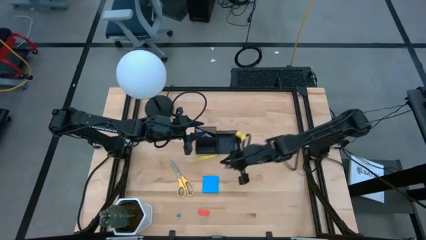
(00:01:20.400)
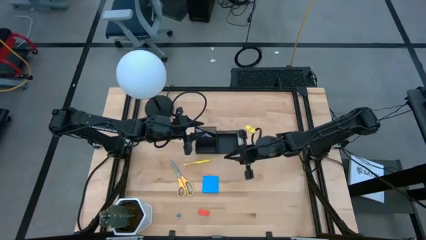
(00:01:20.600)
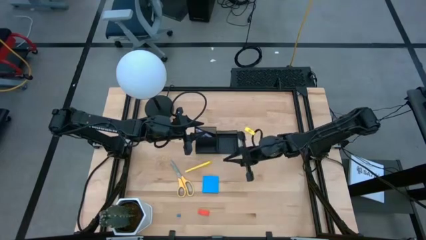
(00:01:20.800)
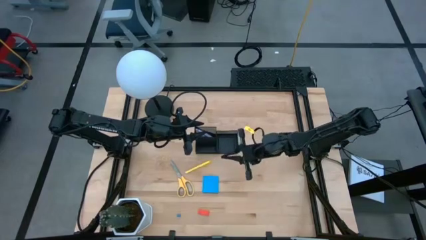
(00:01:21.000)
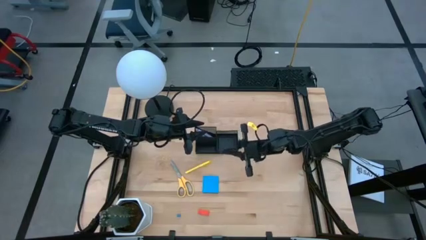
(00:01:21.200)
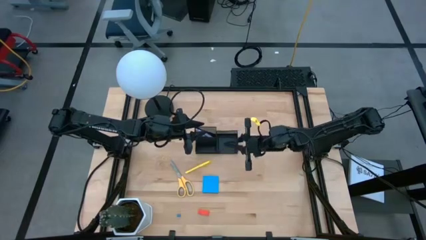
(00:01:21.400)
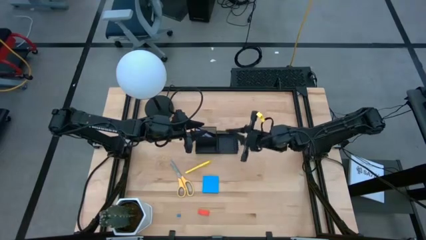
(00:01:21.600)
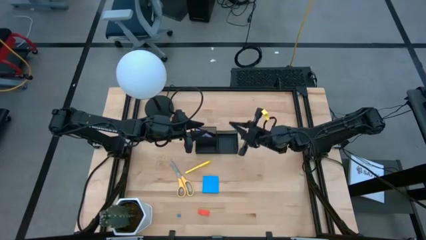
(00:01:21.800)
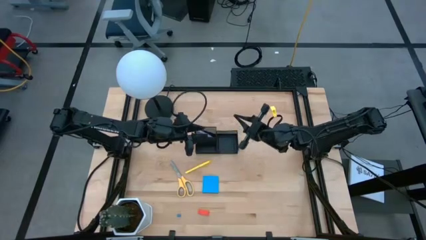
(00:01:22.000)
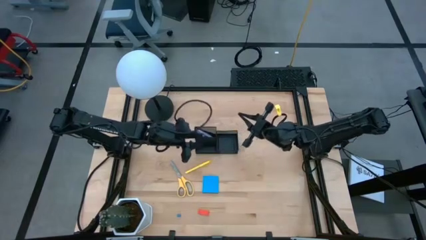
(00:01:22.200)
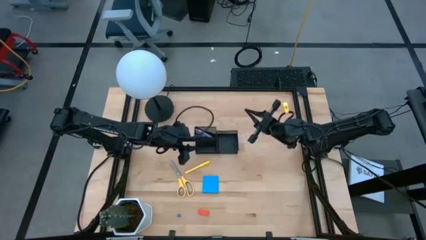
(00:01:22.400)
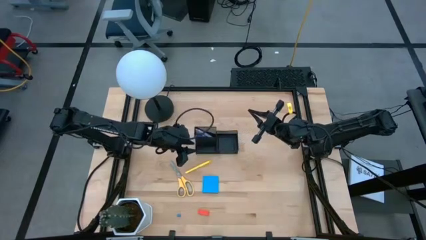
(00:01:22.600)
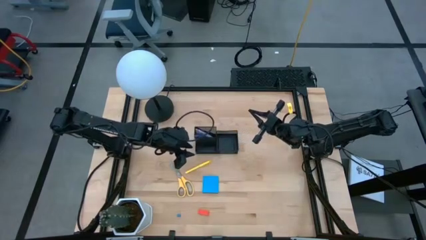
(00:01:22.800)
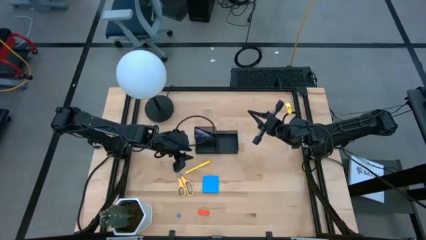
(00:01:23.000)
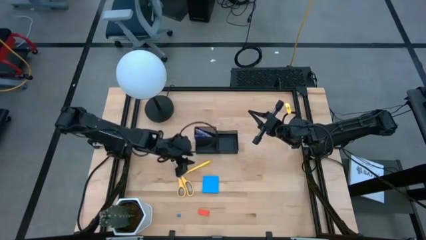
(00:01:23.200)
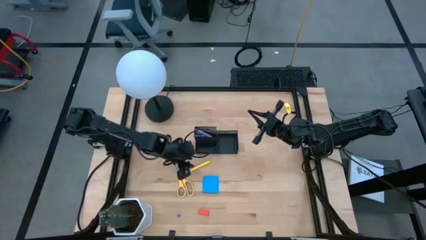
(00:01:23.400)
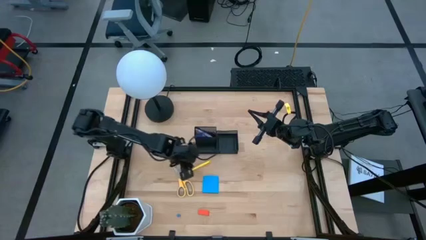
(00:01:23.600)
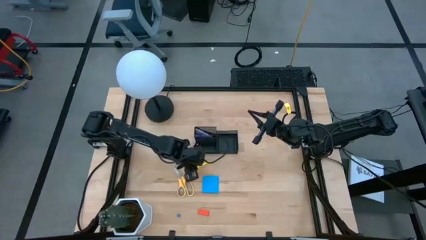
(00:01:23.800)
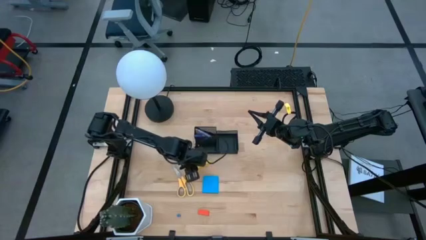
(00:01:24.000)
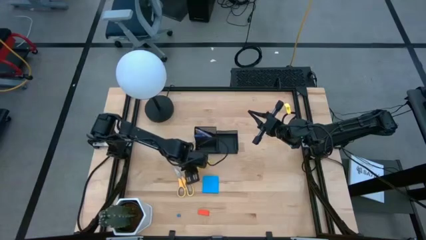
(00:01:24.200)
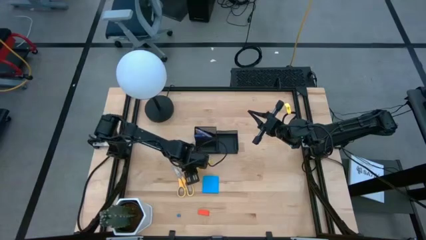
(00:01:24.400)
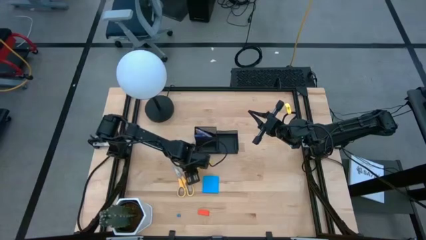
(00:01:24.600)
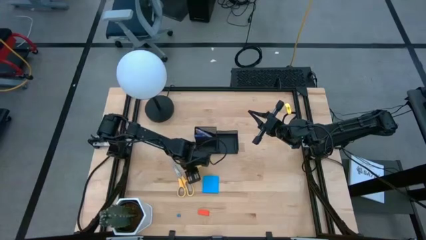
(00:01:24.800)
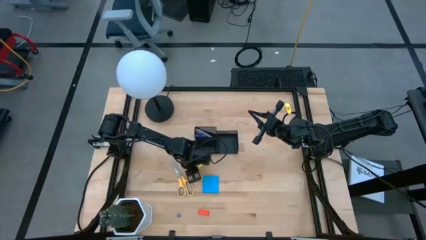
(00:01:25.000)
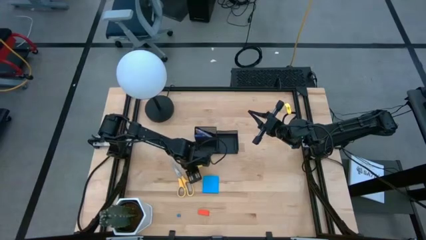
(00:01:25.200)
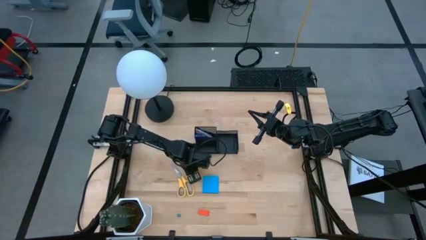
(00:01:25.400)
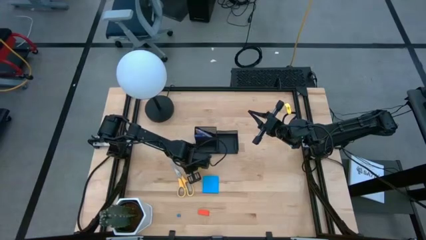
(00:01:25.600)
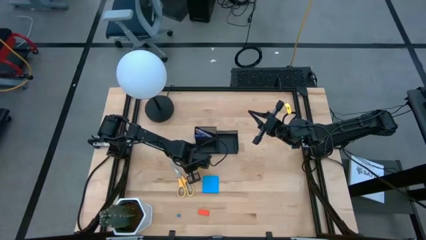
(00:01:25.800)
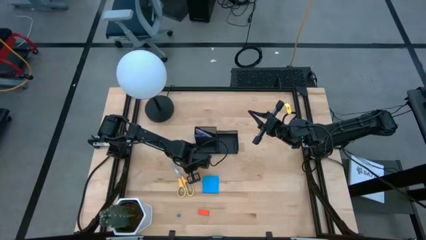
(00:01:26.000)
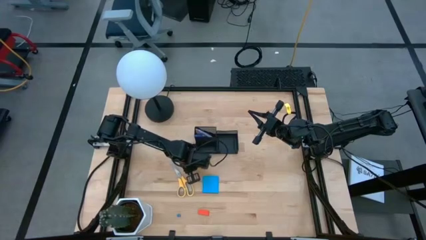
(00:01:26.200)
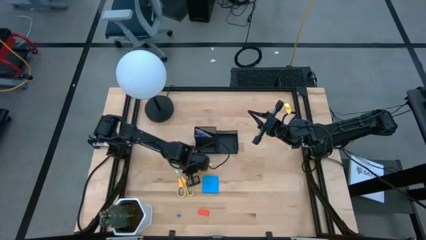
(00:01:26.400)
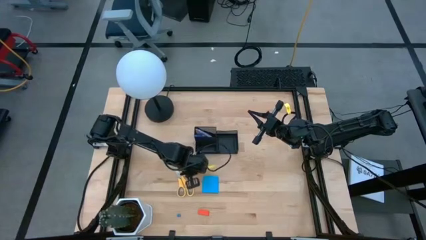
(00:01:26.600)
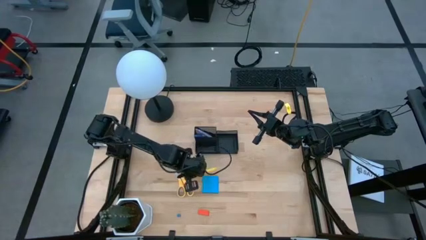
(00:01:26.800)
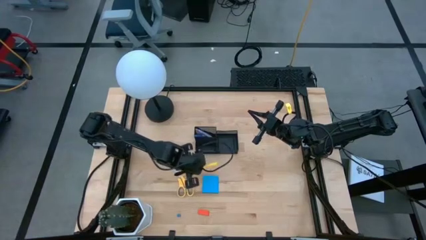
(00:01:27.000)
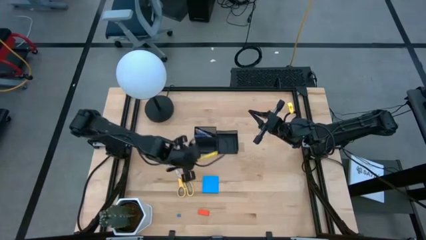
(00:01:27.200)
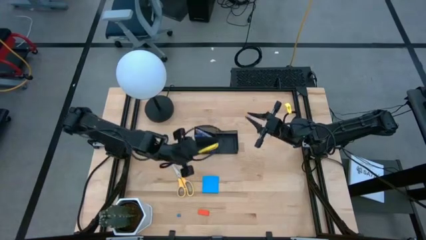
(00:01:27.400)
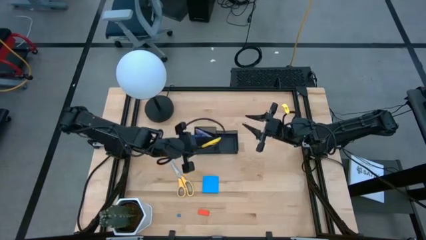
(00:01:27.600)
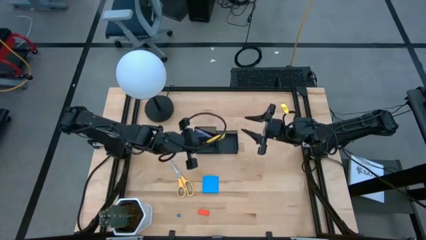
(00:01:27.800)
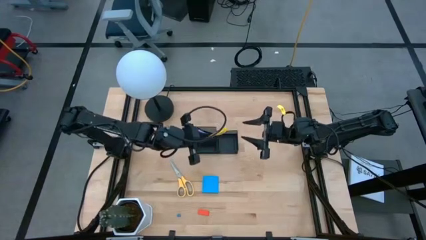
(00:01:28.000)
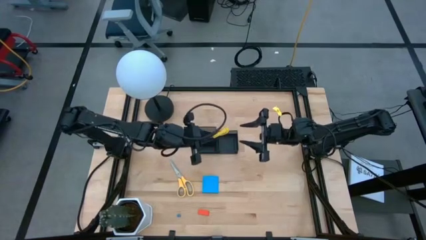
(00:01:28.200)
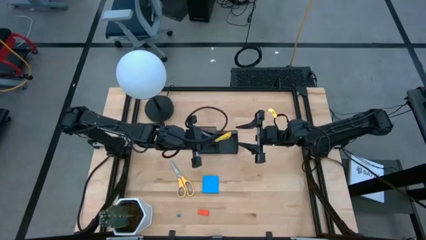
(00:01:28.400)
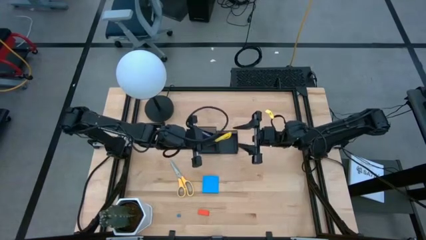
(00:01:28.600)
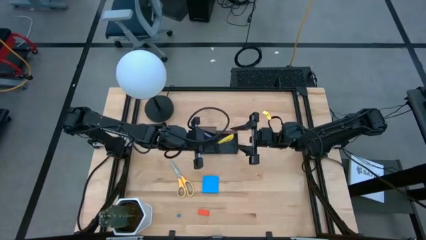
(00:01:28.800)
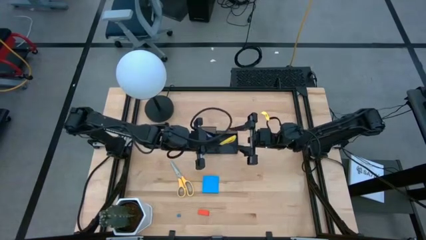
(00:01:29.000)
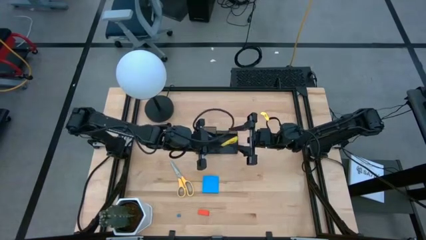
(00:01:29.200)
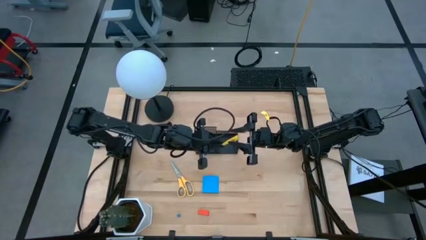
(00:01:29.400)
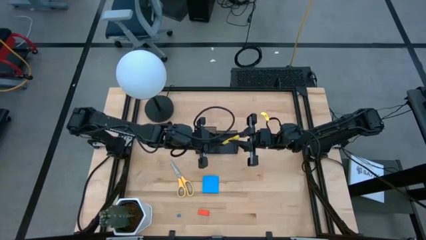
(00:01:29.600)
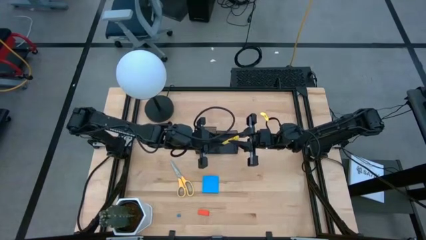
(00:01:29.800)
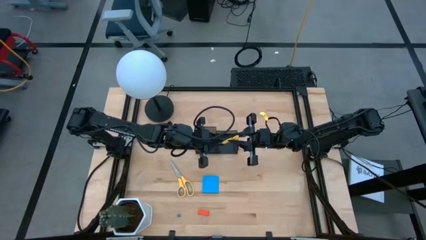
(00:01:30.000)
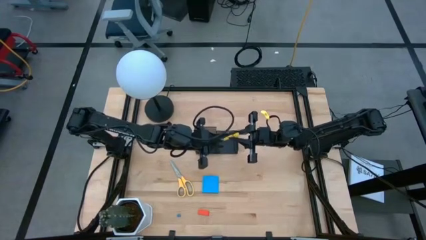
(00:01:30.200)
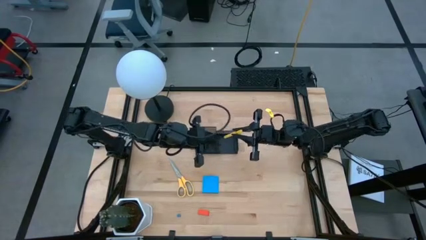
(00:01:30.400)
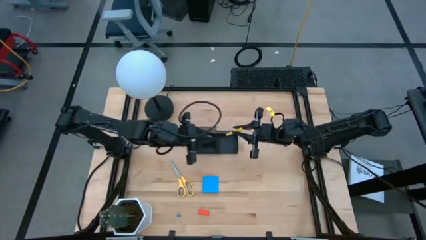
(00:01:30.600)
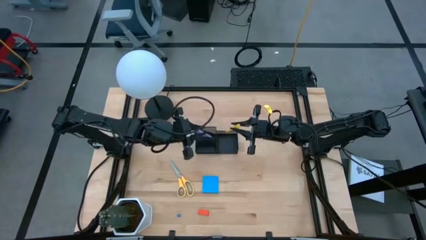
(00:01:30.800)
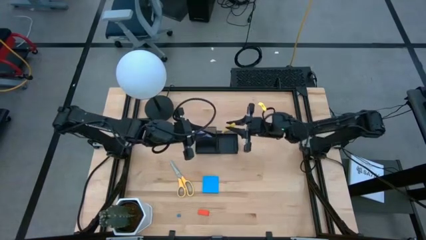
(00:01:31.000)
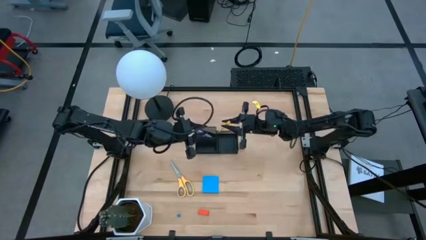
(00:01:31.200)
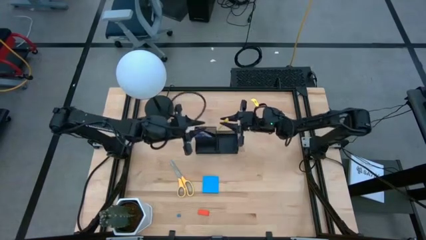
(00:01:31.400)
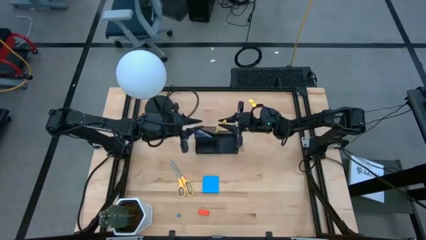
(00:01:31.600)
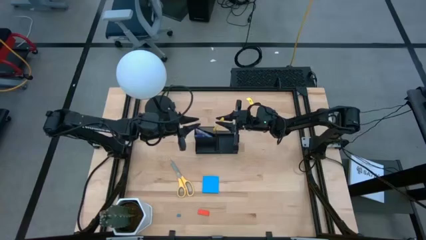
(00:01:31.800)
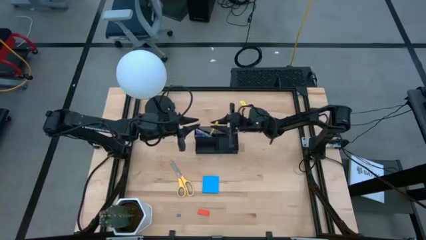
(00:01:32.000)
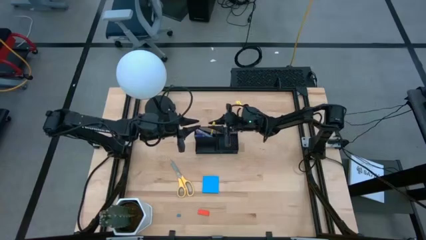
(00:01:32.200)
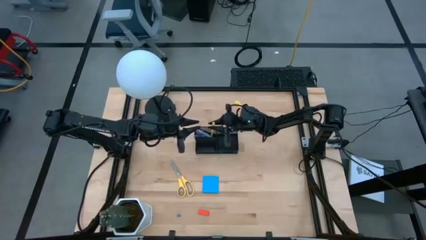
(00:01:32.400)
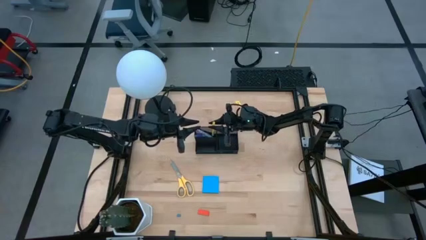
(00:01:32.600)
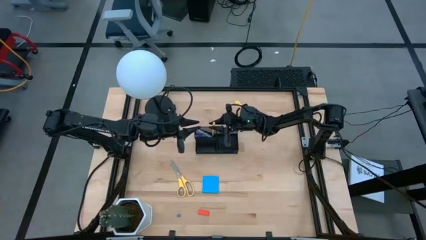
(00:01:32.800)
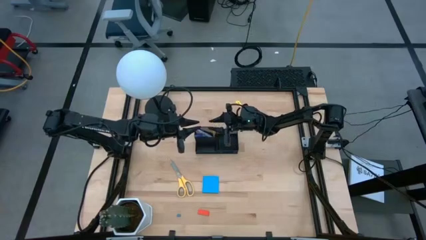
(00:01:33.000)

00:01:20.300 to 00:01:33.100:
Task: Pick and place office supplies into organizer
Put the yellow pen into the desk organizer

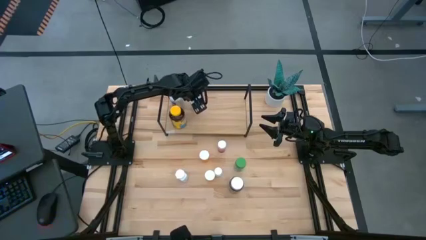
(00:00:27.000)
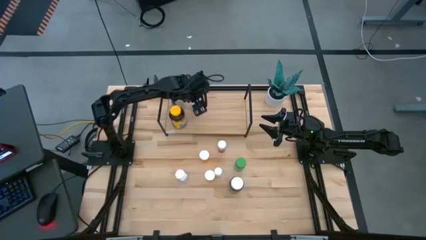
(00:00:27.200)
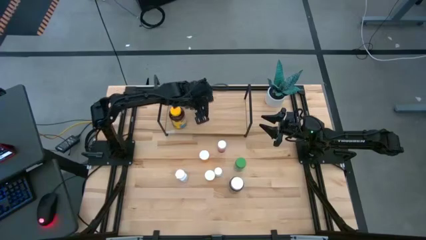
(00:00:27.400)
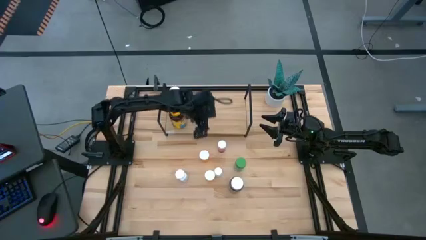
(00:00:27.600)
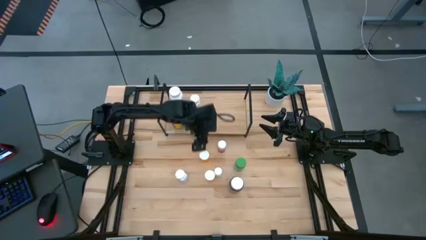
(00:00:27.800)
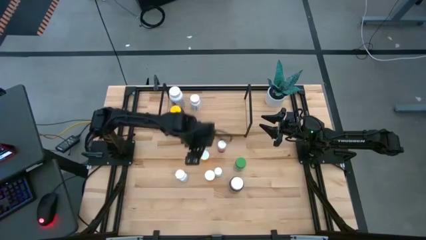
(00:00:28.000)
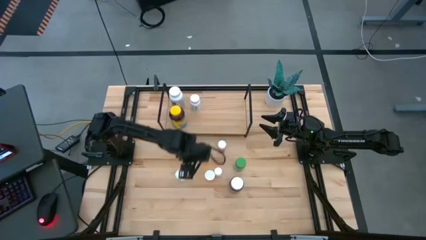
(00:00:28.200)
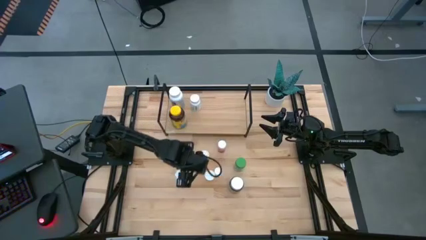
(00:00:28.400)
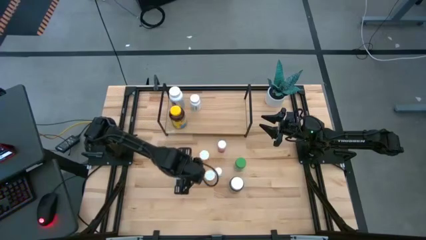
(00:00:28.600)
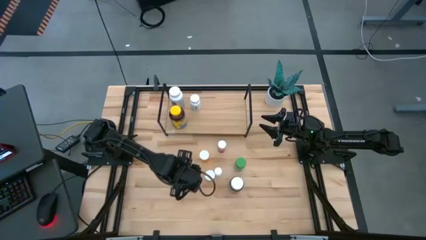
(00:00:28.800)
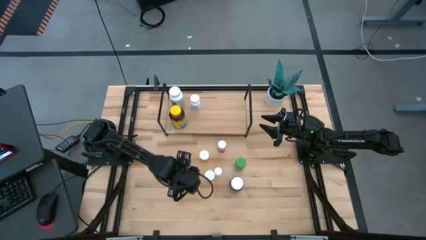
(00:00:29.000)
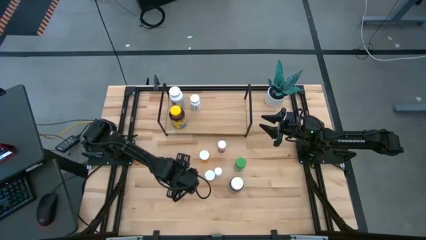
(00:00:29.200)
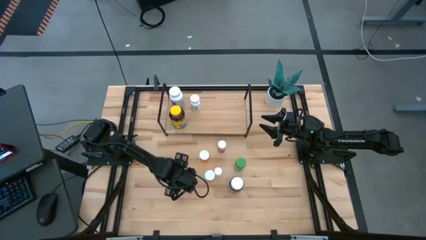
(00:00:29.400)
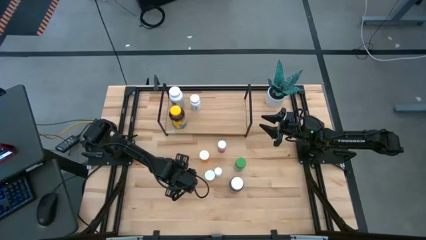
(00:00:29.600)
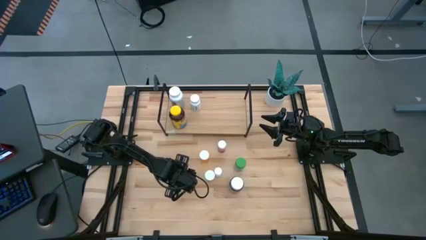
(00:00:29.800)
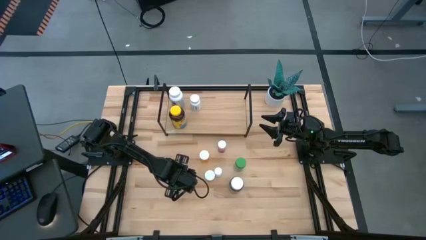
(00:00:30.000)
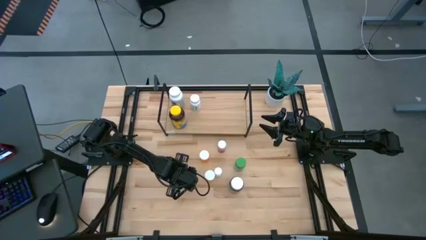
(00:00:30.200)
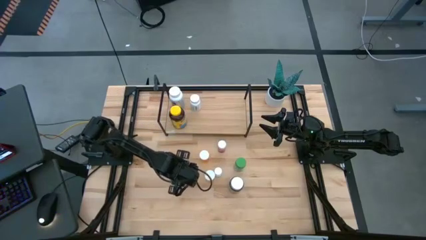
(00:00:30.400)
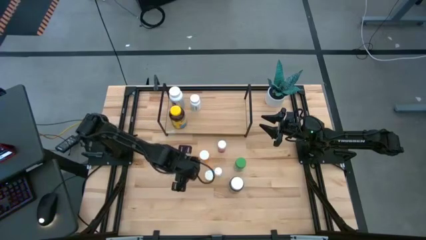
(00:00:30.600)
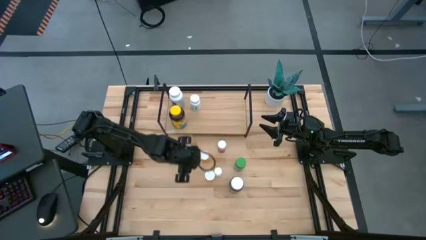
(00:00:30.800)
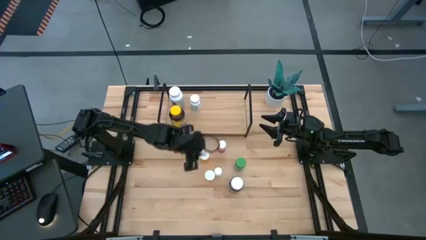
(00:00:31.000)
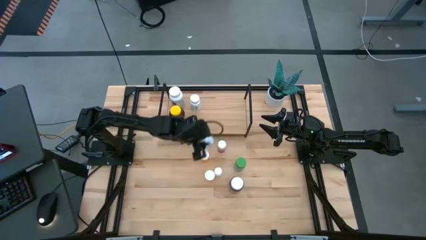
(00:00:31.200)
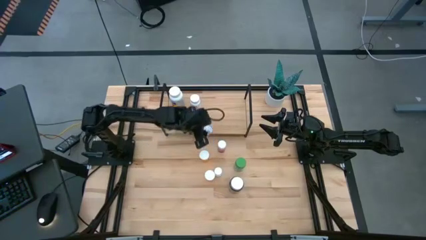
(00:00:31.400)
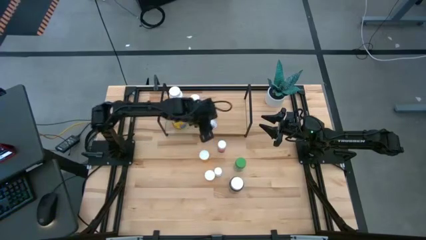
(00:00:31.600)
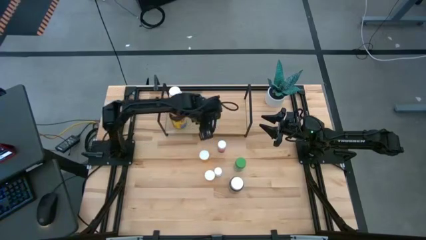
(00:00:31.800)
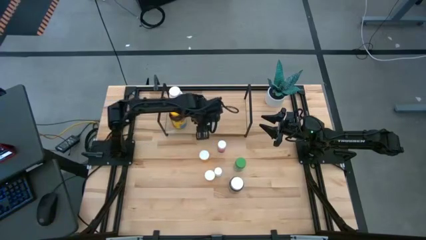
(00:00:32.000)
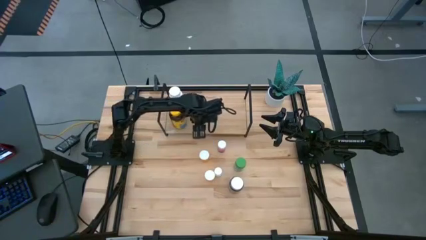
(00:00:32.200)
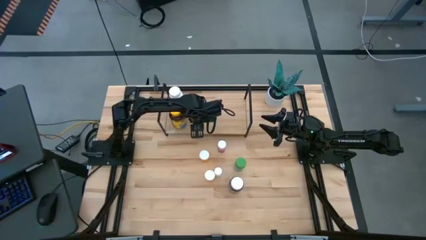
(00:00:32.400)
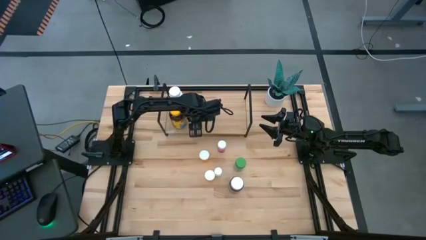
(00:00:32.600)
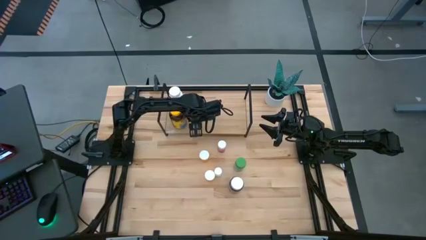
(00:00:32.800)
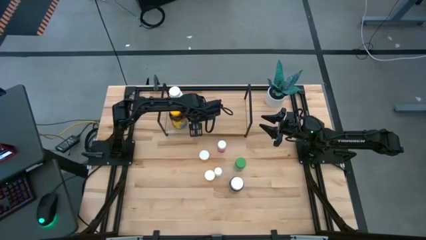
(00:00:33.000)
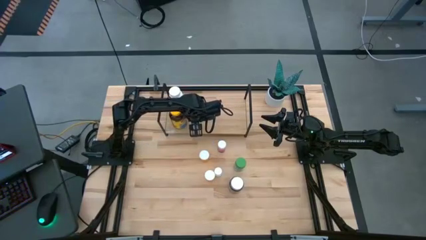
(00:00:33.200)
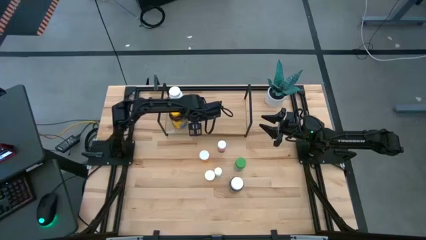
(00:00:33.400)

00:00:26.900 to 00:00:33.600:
Task: Pick and place medicine bottles onto shelf by color
Put the white blue pill bottle on the shelf
